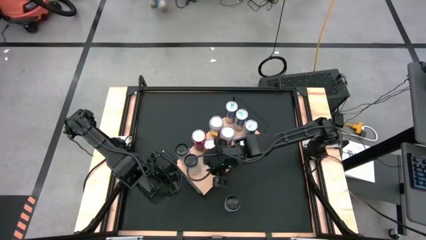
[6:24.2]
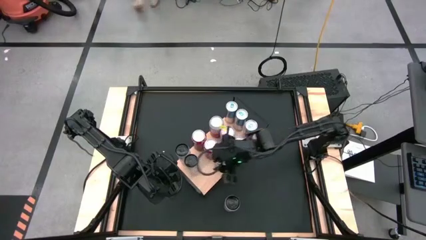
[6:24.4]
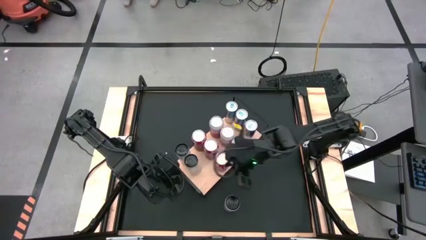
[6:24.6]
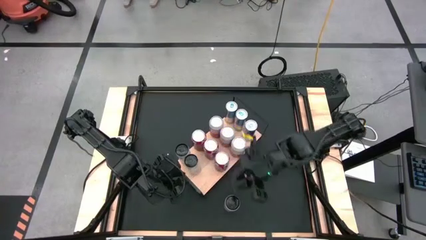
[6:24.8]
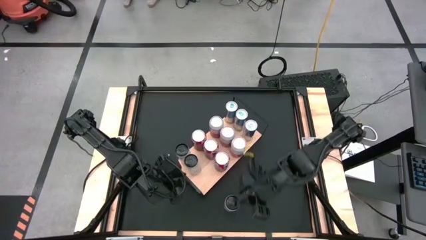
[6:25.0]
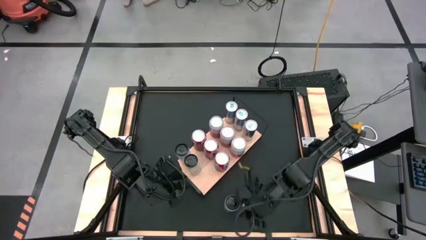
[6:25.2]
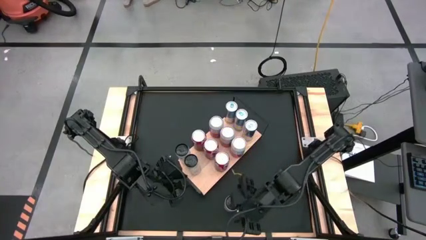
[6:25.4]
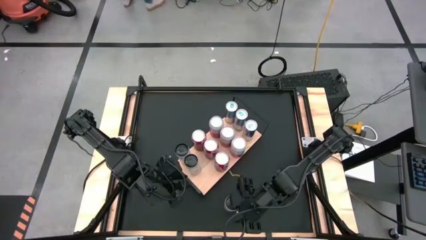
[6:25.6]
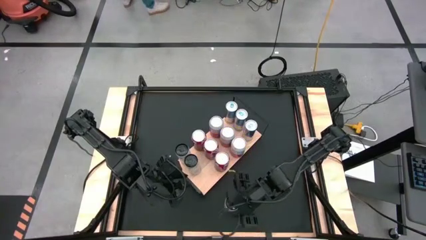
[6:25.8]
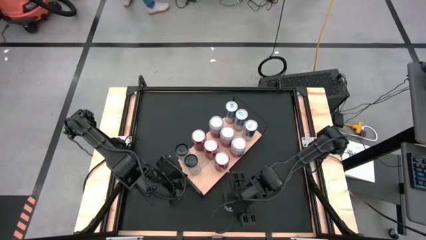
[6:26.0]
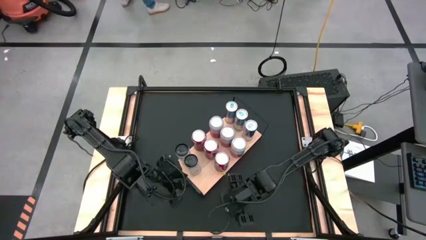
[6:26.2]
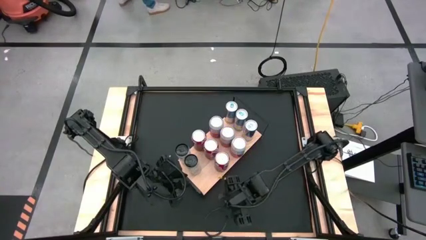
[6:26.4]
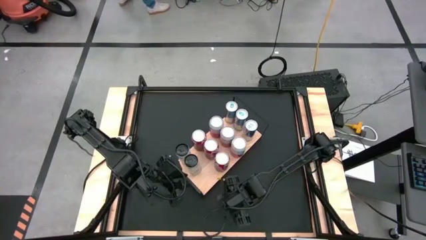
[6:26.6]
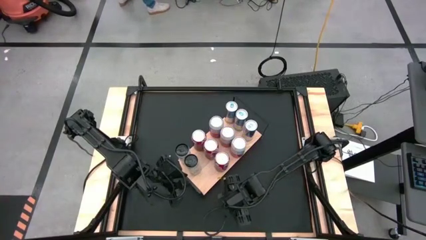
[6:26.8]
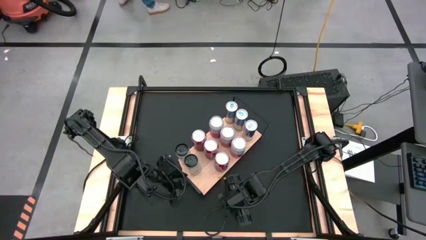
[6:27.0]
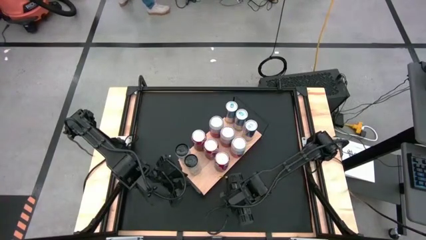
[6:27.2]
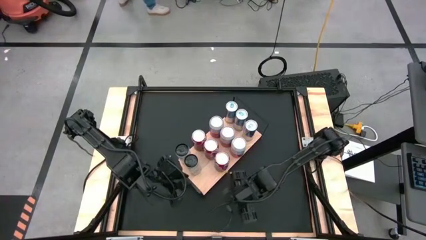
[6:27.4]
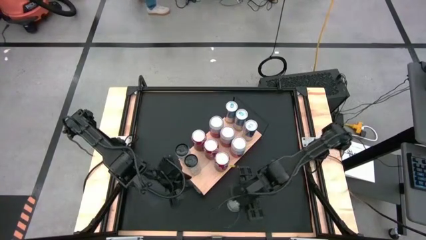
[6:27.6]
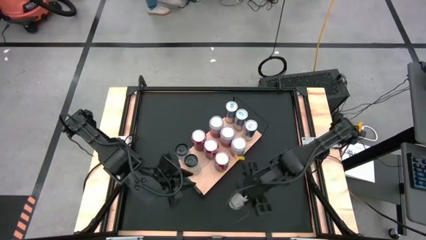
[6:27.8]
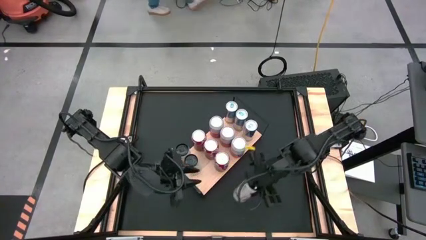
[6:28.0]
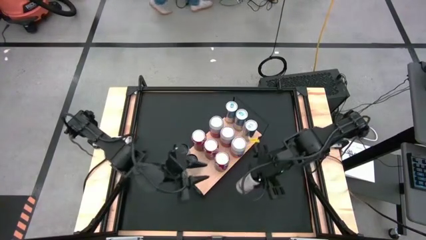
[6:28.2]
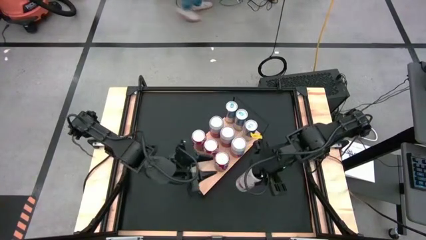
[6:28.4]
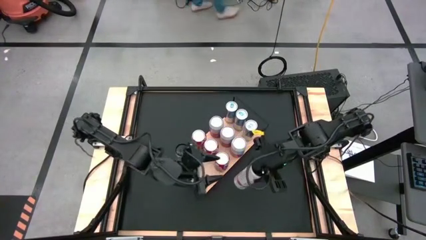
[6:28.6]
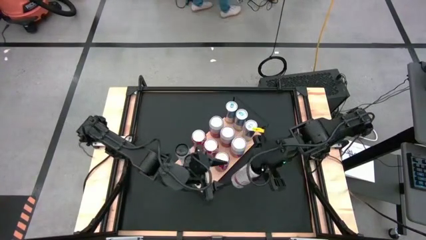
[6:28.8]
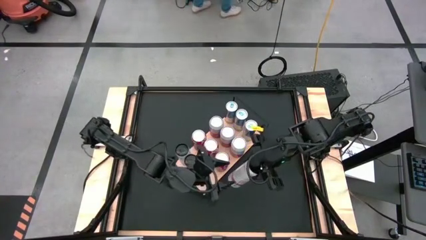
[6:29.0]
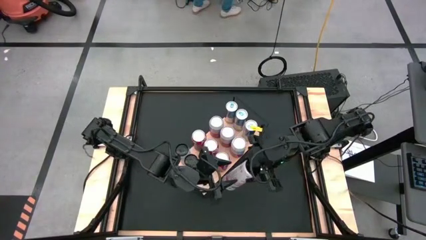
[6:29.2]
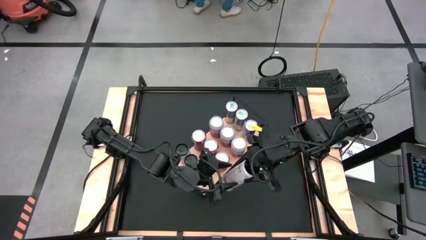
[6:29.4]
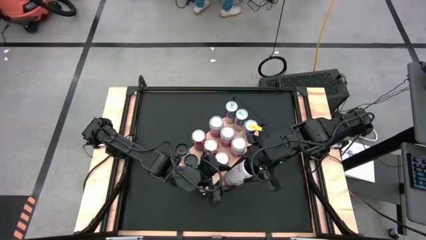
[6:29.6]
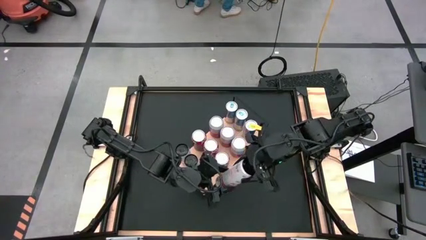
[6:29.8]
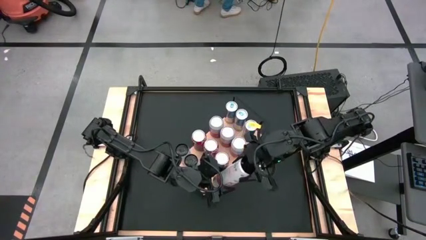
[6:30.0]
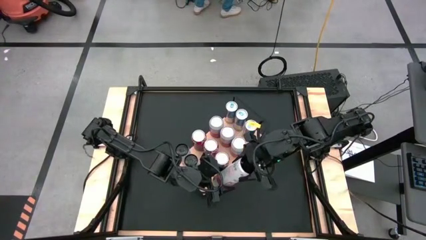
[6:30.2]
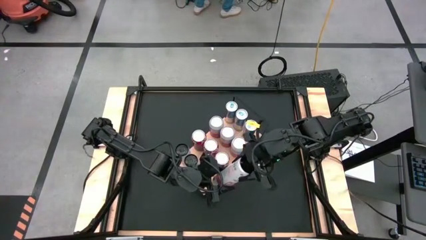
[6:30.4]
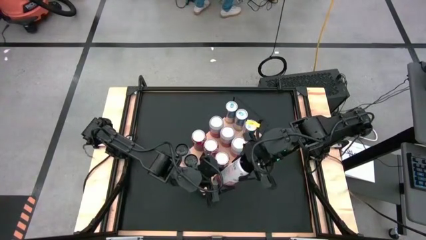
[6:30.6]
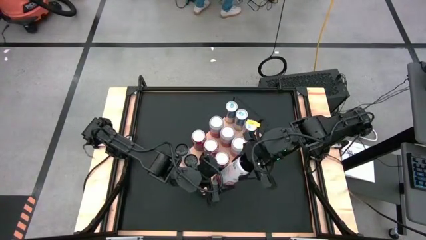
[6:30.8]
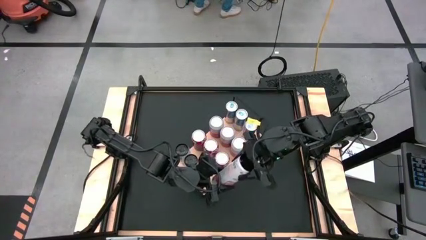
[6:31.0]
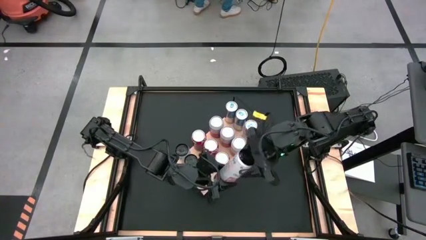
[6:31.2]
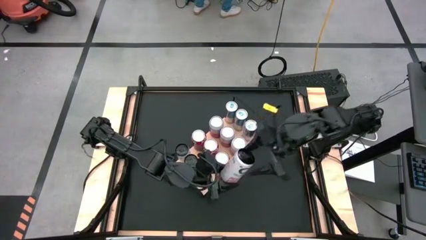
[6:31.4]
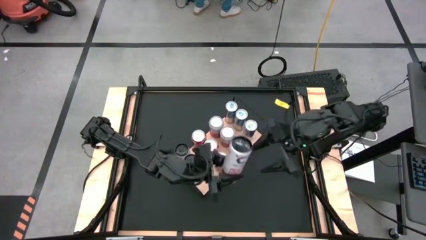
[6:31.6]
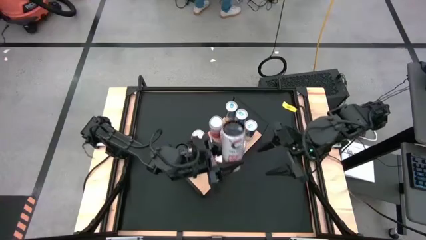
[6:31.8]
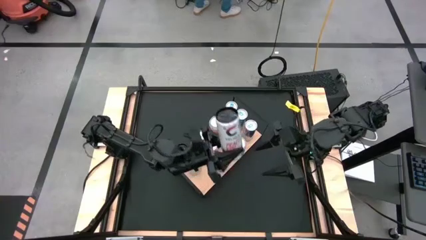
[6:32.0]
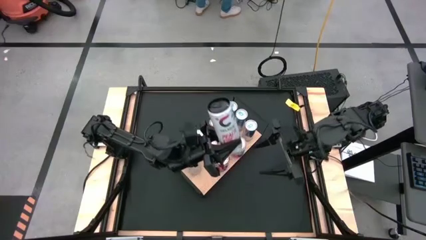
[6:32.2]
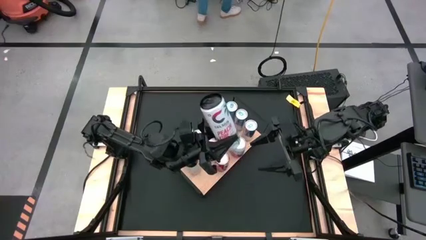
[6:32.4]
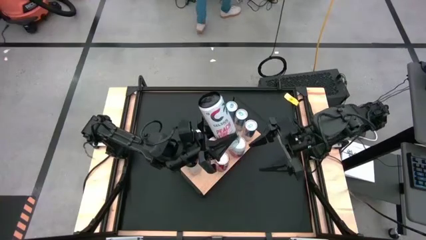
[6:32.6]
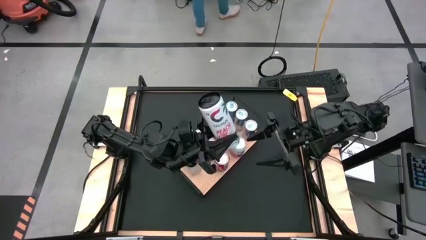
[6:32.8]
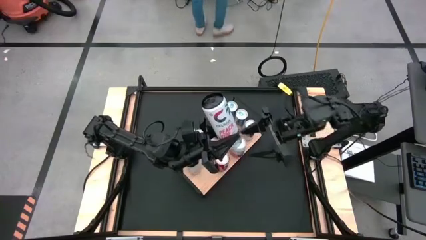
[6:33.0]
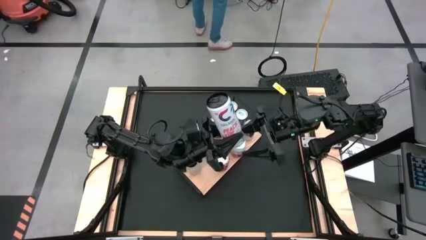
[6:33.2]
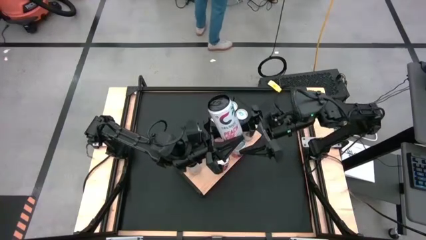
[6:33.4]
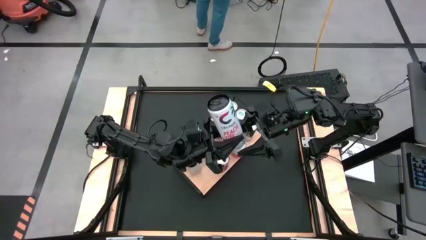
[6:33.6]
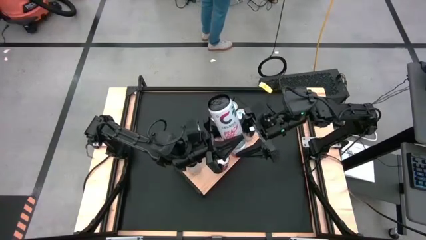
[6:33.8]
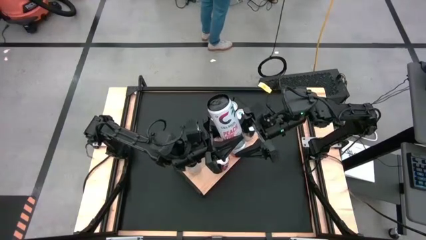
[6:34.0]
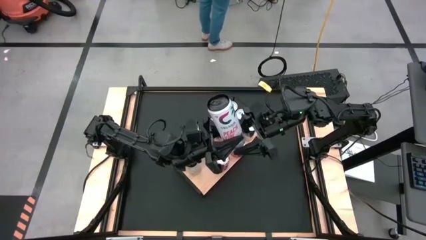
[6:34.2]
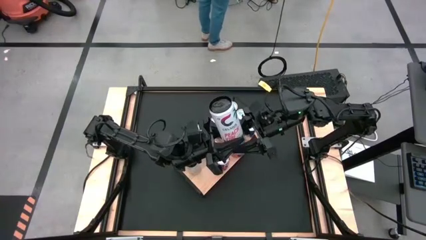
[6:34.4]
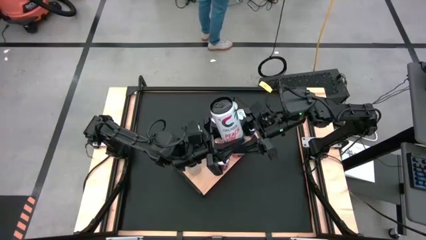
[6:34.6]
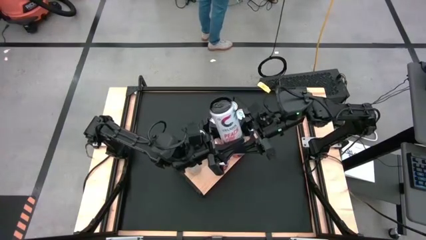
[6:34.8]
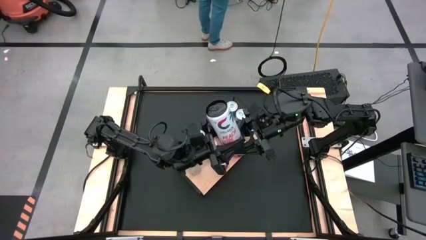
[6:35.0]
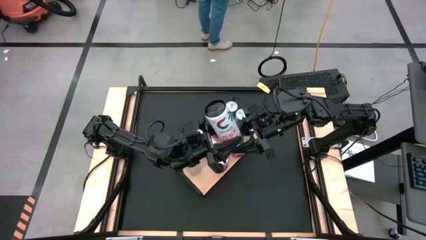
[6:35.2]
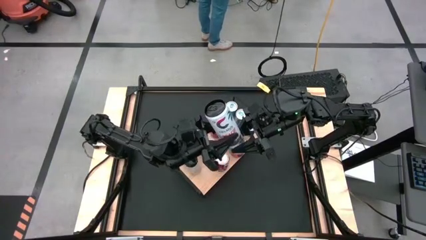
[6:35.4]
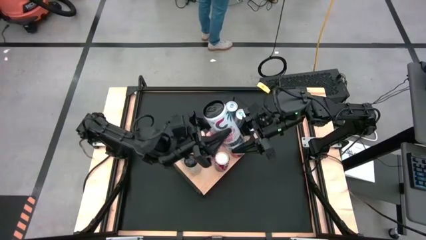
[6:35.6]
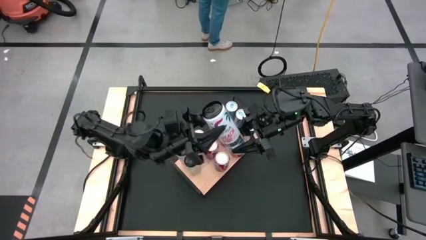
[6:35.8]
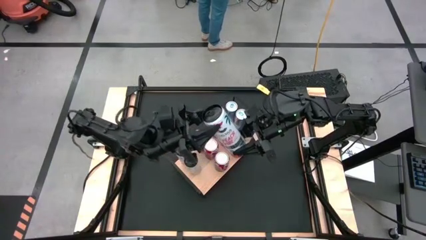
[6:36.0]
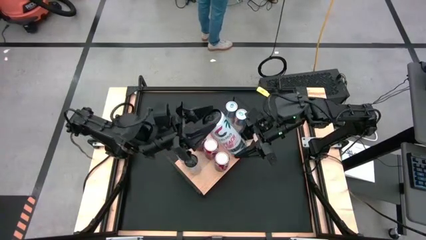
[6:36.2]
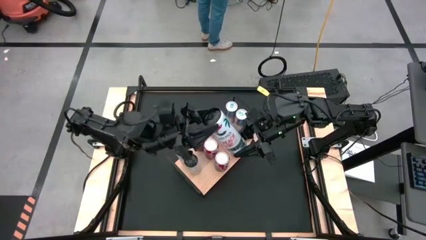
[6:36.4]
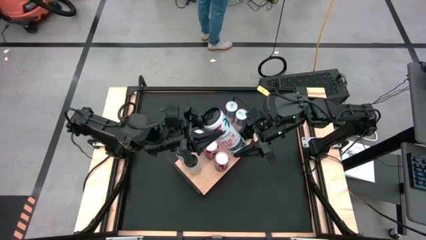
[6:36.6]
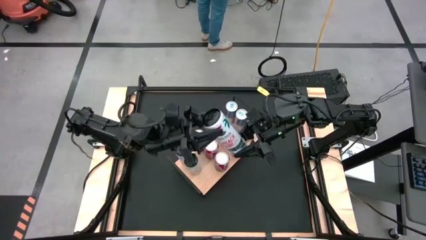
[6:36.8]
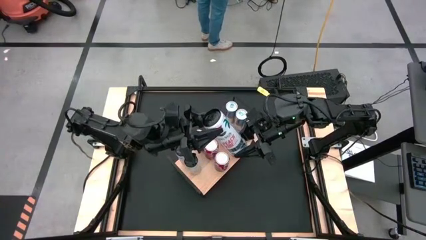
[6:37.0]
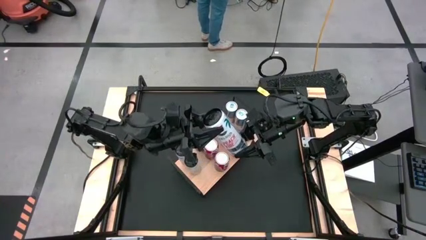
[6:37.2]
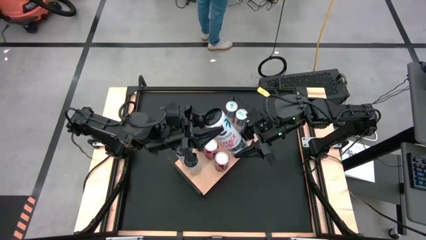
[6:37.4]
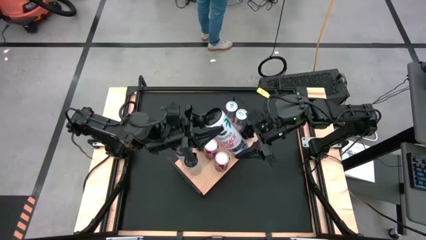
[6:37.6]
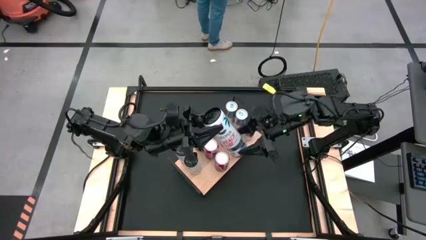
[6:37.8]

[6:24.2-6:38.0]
Task: Place canned beverage on shelf
Put the white pink soda can on the shelf aligned with the other white pink soda can
